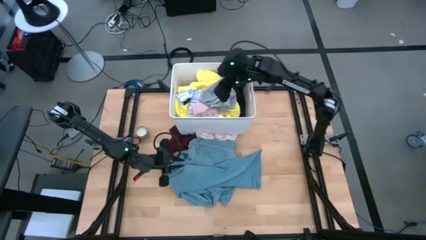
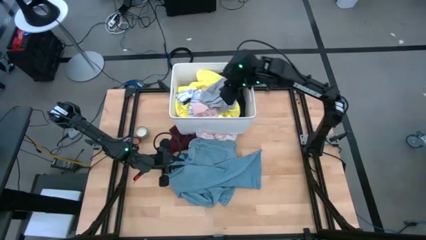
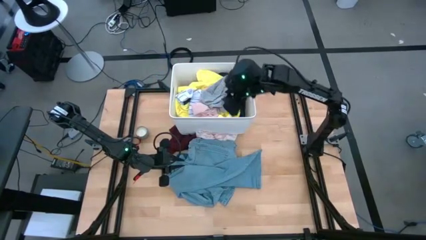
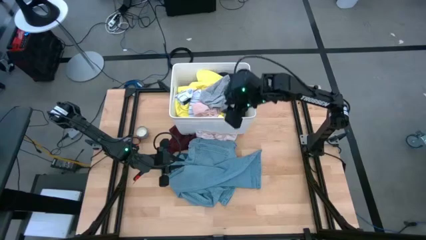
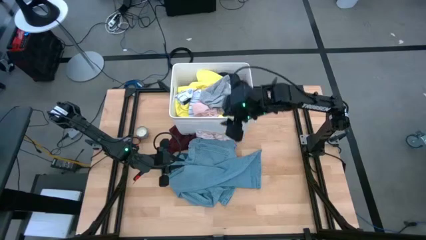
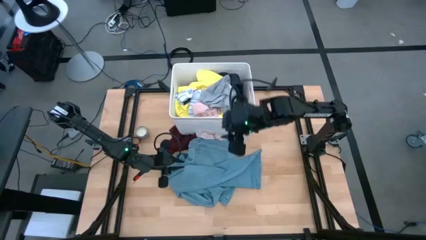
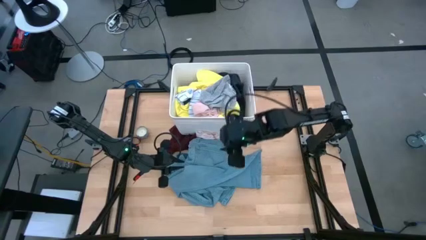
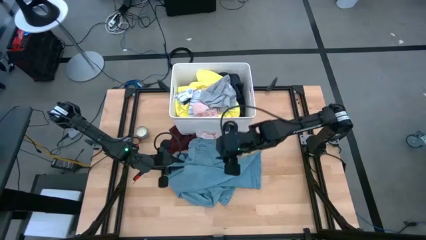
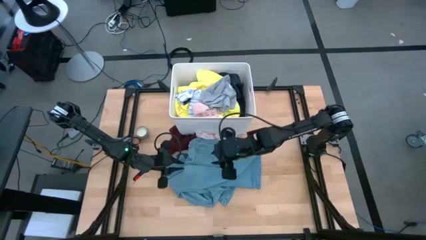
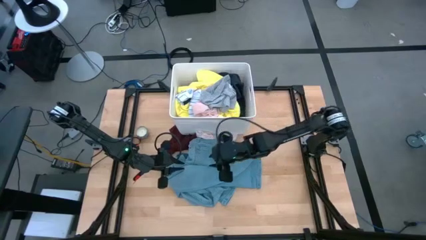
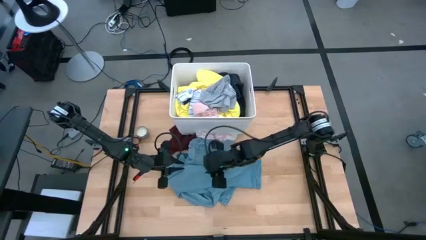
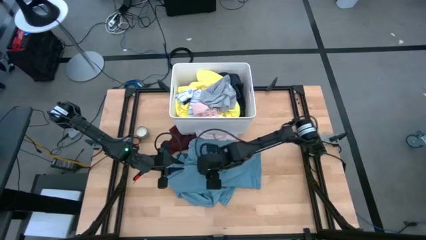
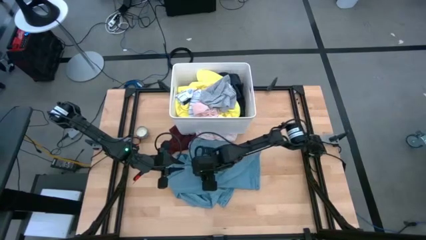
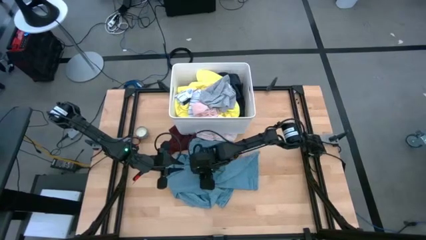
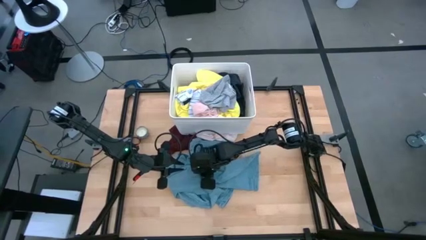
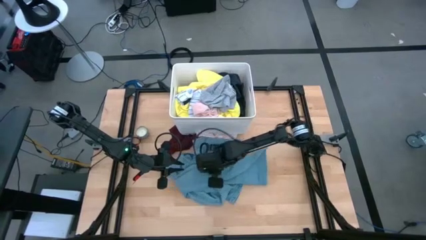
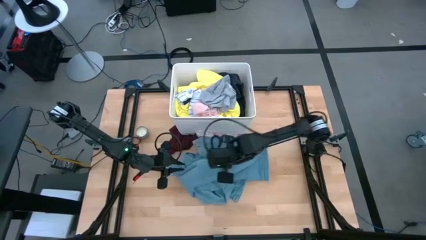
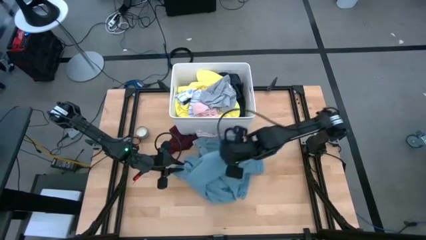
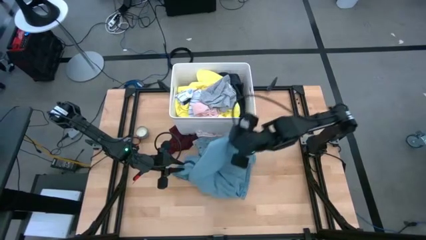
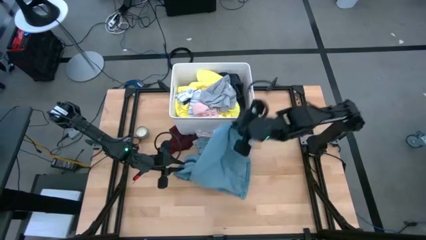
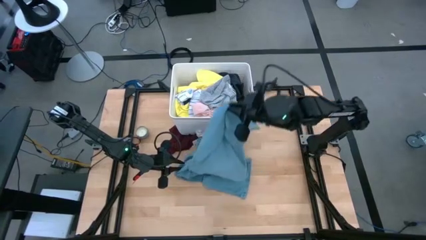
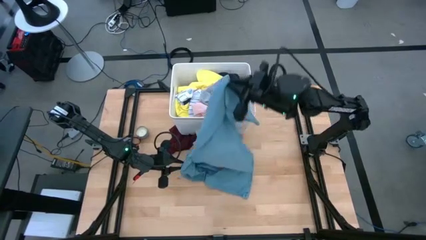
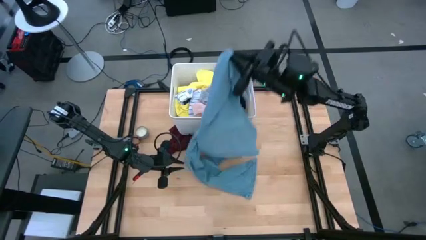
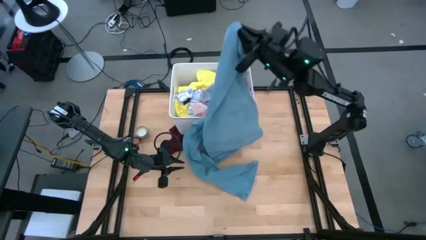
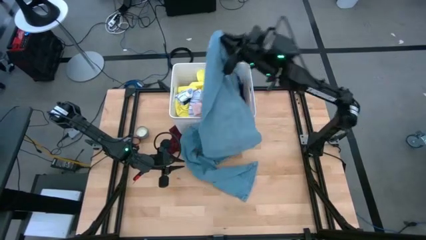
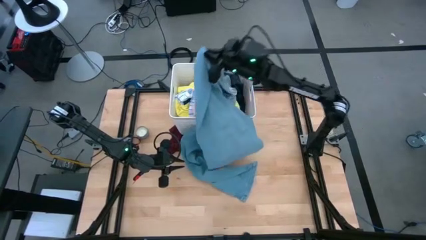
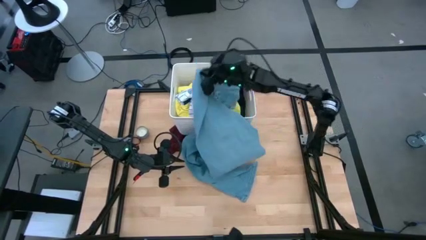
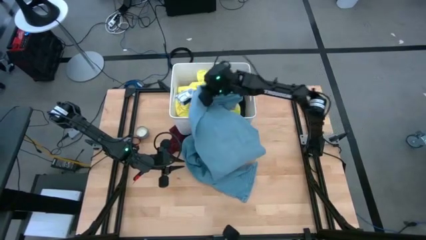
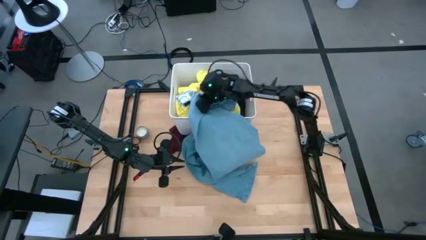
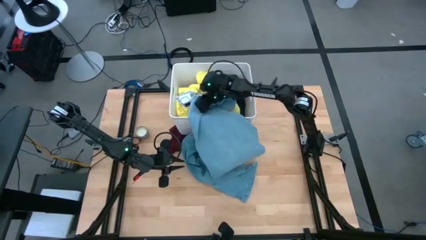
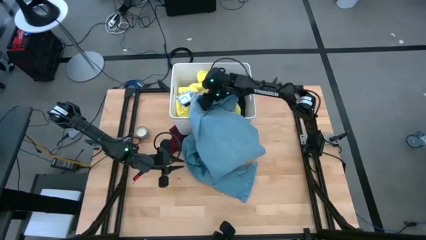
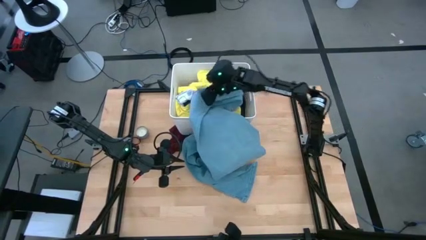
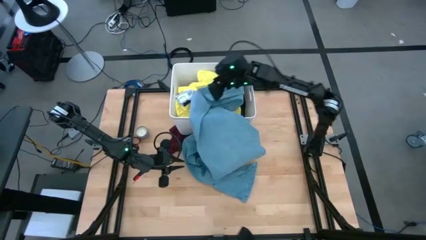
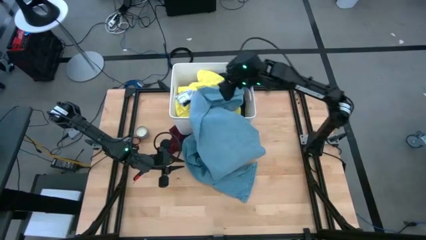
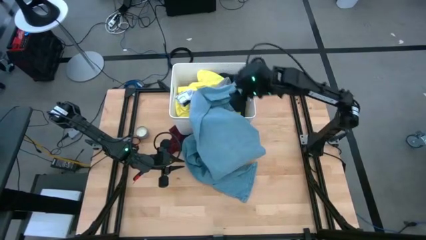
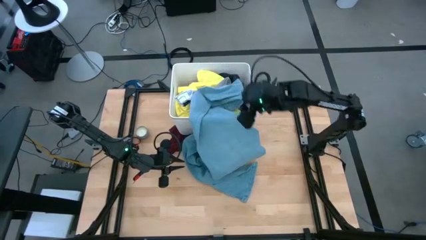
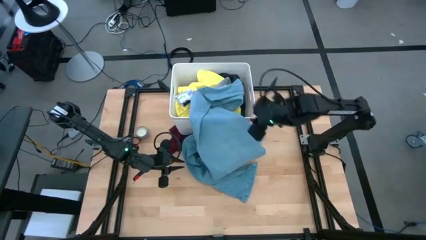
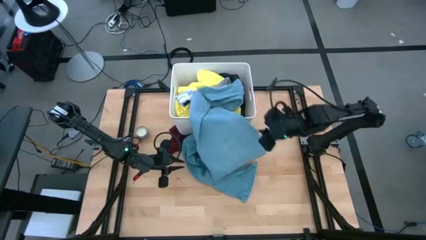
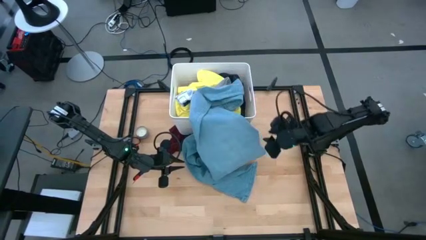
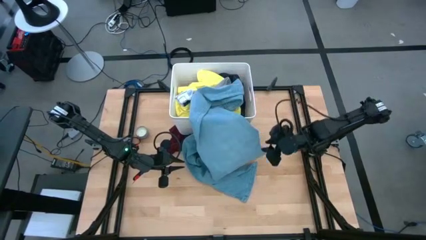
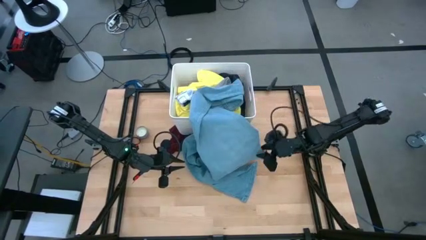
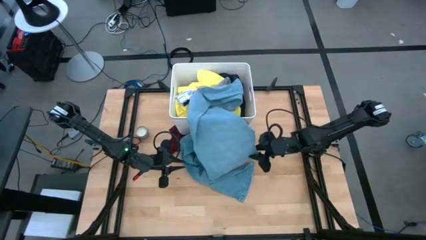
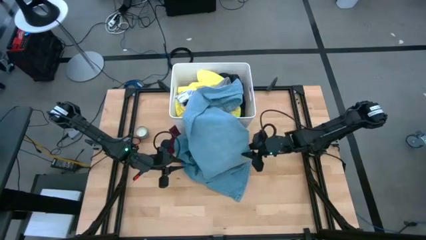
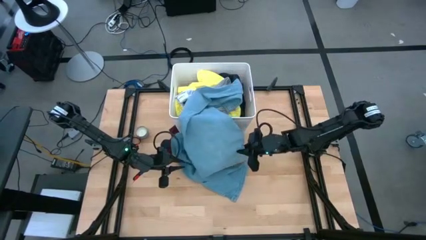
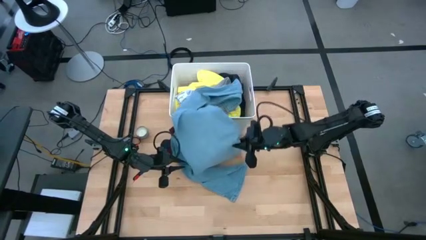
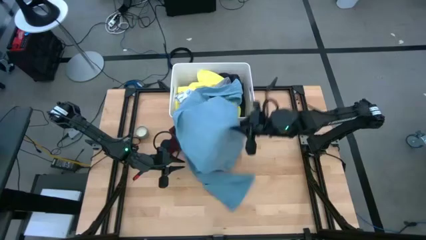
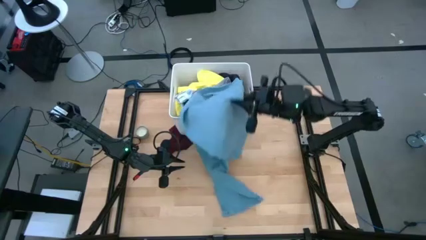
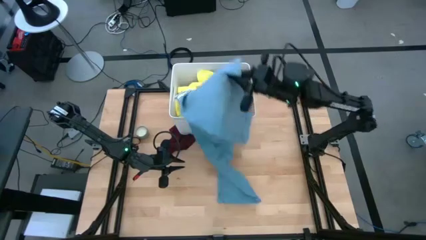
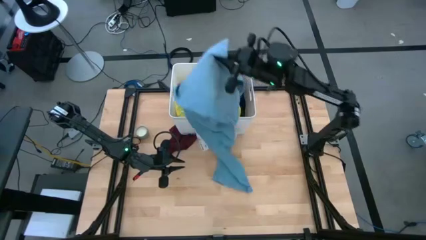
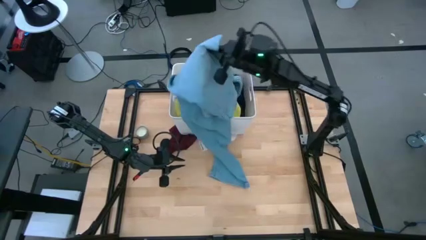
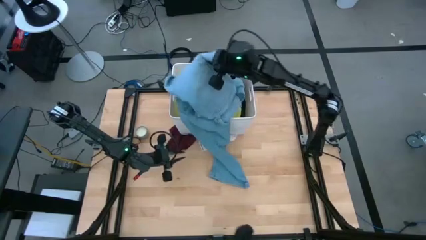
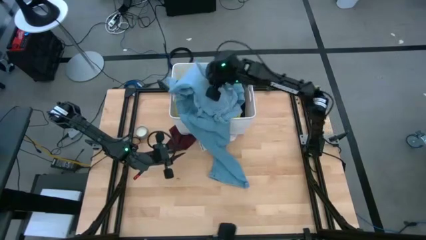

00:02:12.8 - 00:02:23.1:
Task: Sort clothes
Put the blue jeans into the white laundry bin

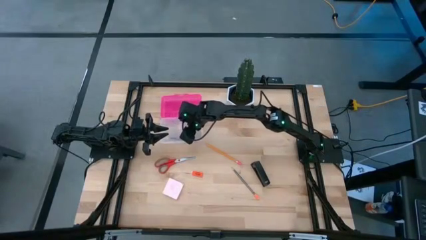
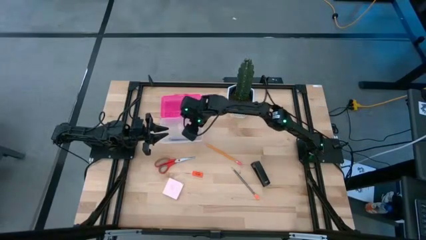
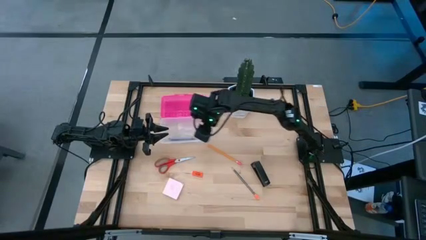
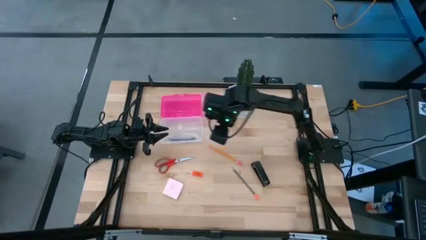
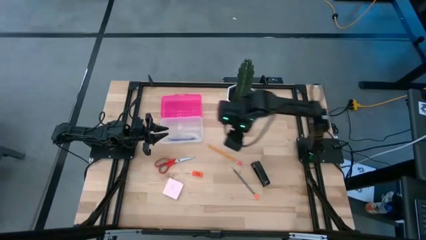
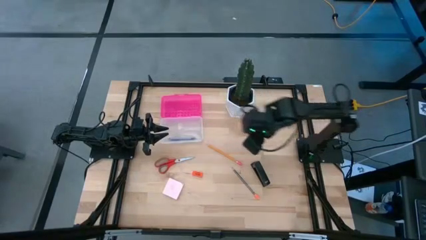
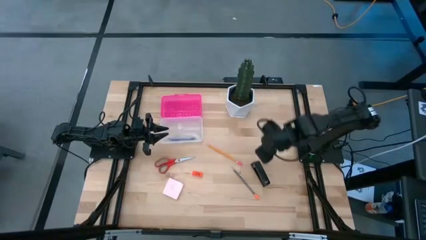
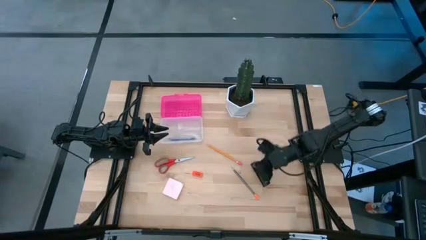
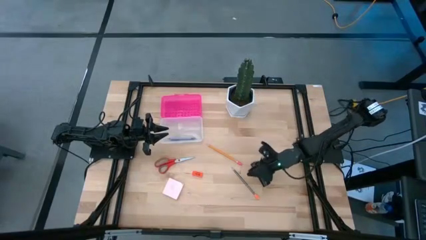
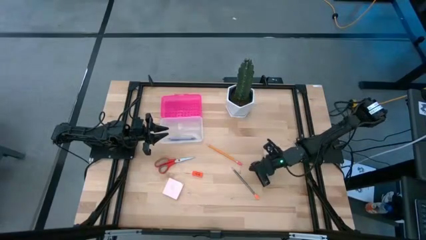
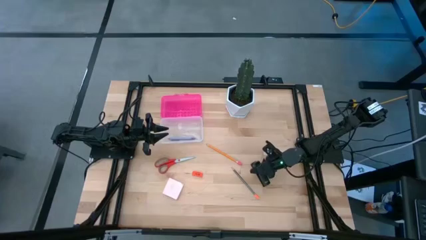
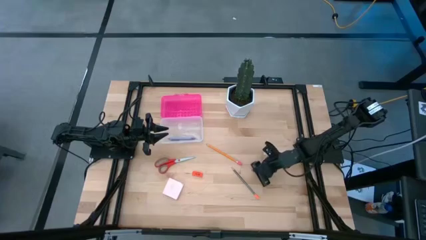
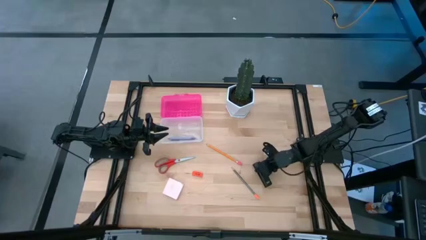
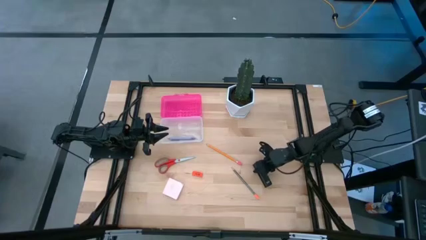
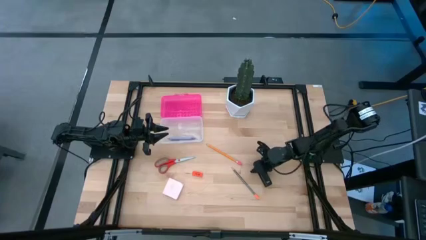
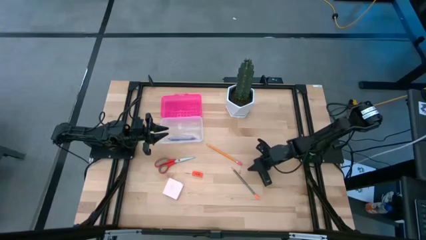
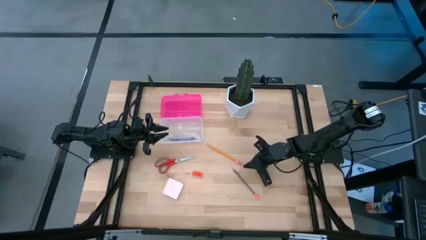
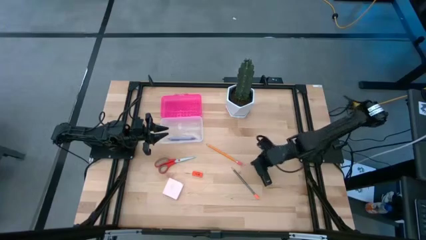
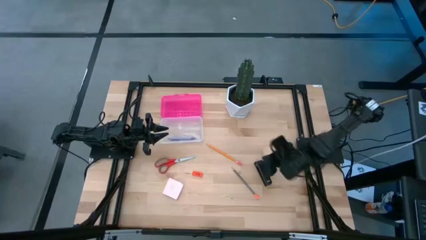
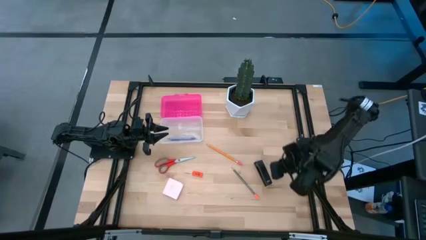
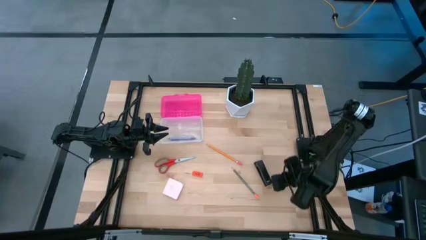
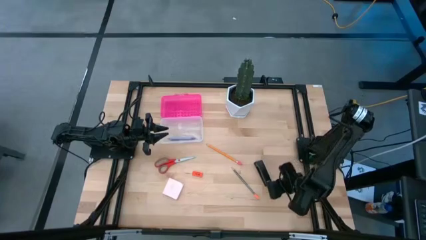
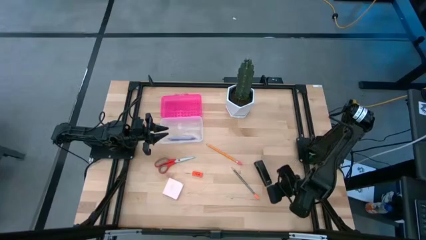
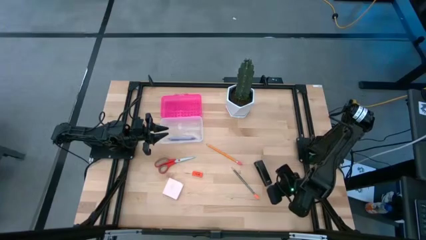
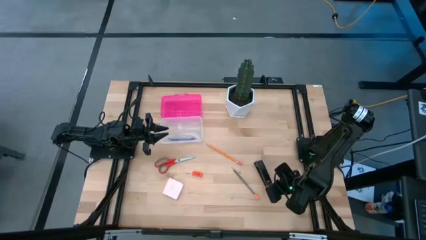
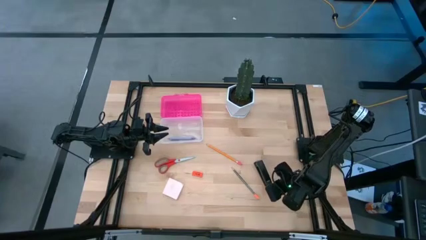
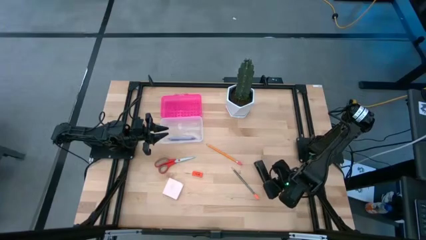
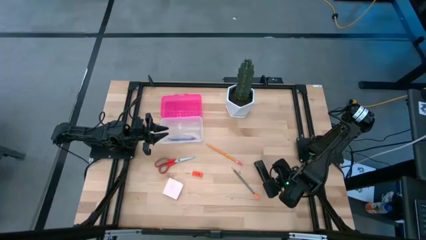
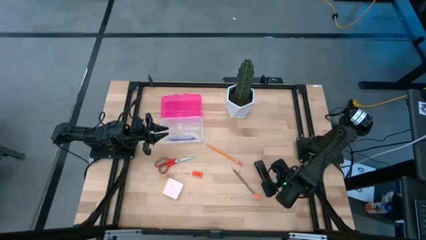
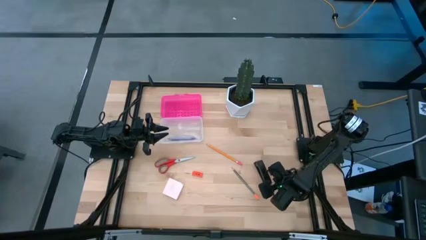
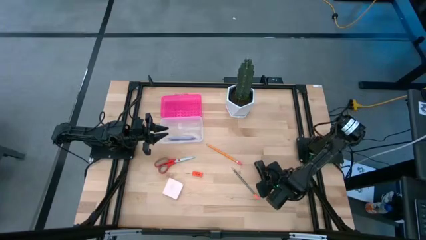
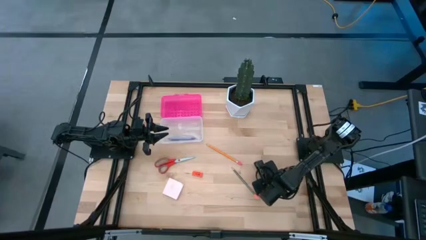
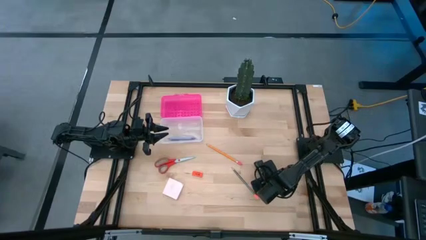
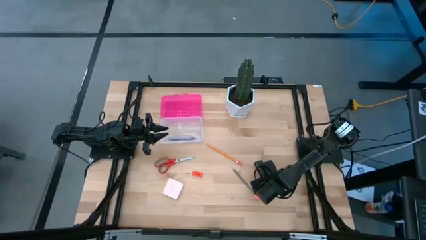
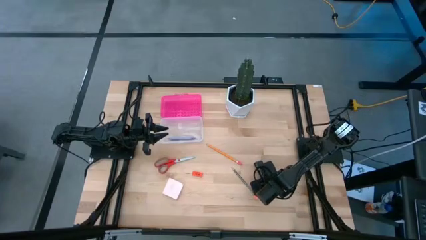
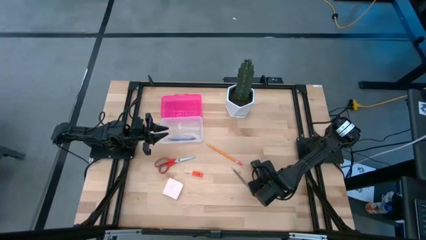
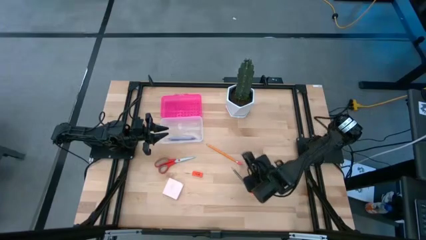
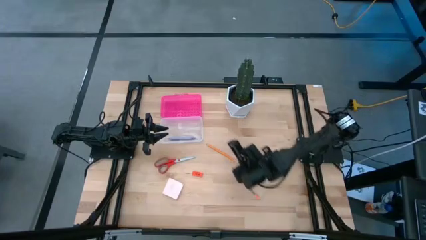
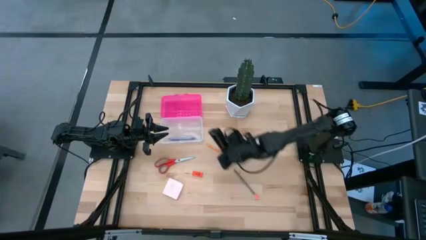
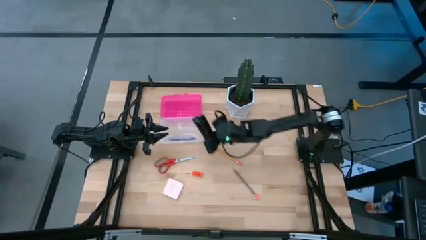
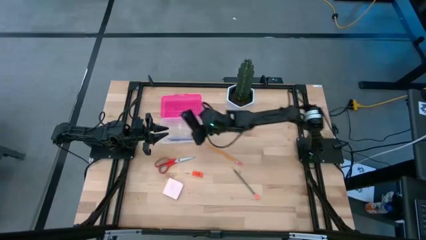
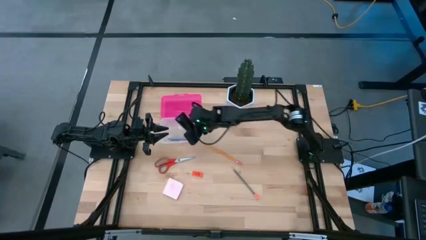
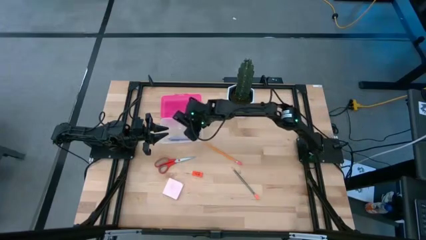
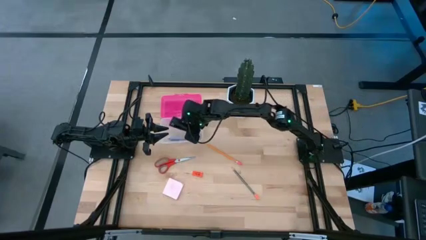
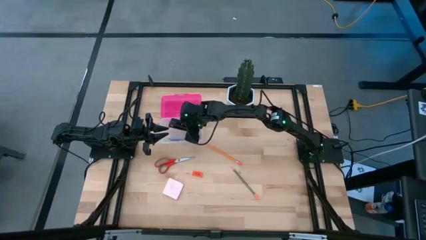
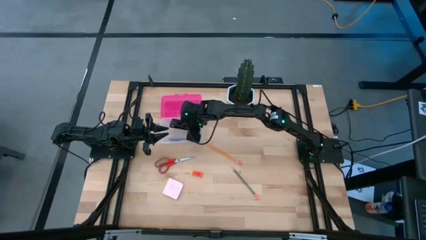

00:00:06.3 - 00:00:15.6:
Task: Pack school essentials
Put the black stapler into the supply box
